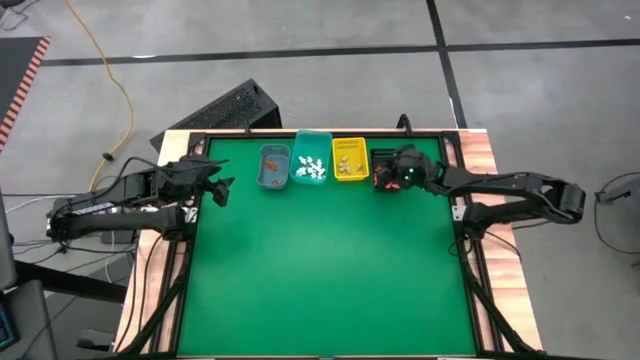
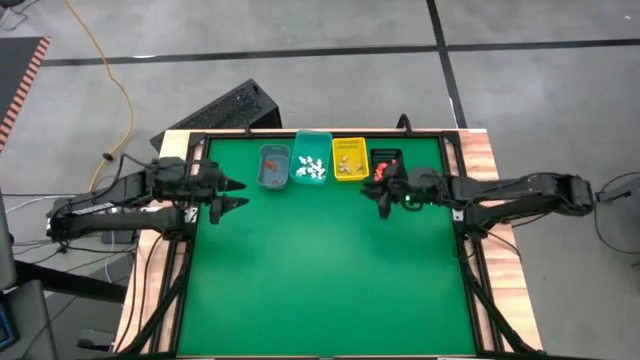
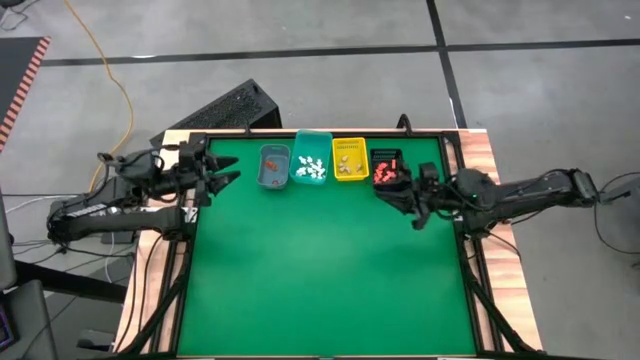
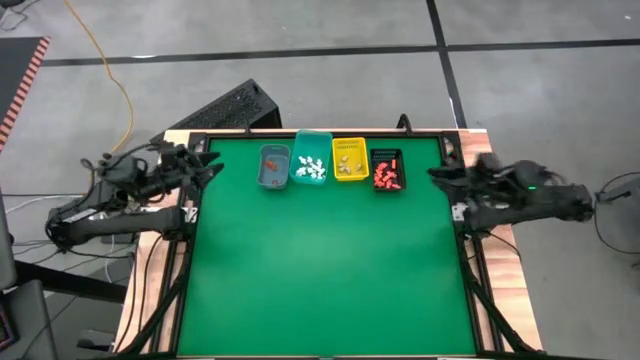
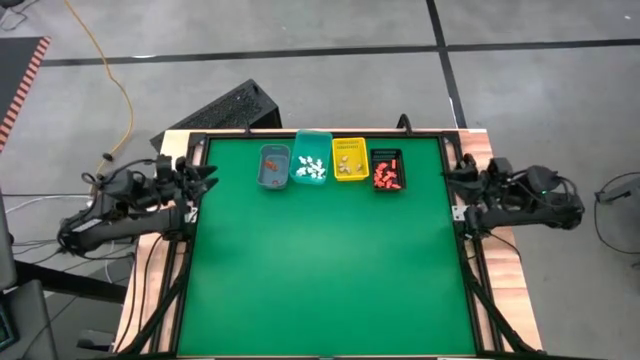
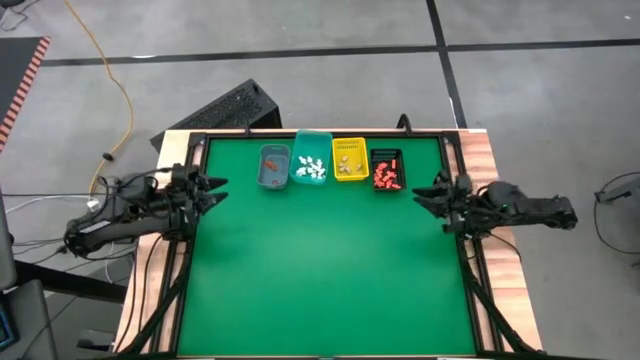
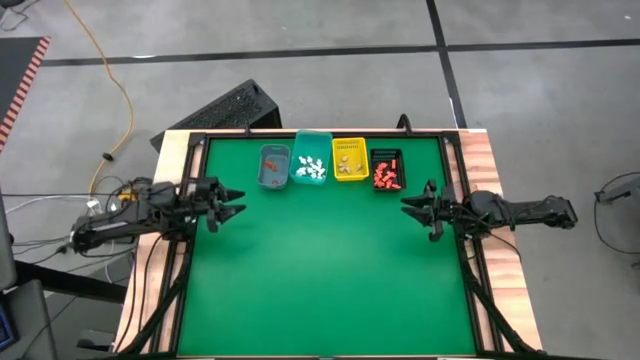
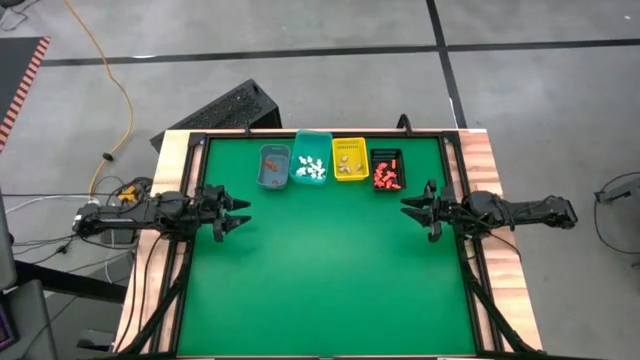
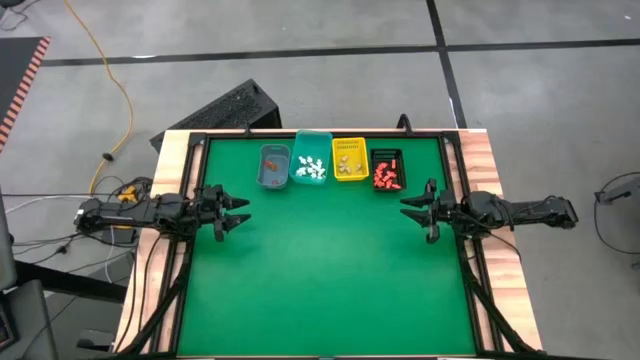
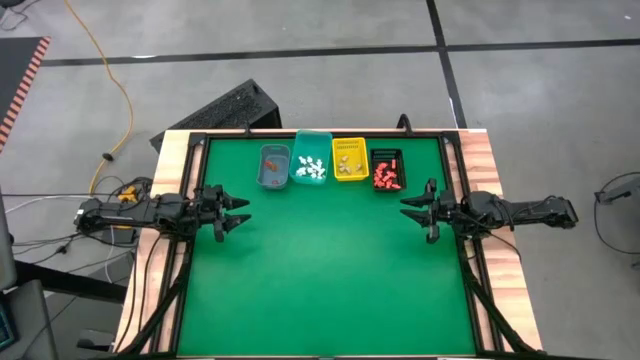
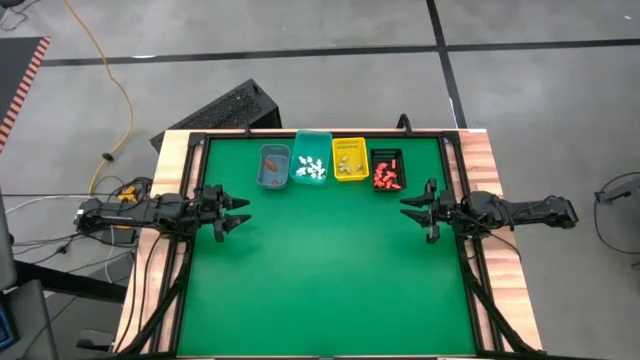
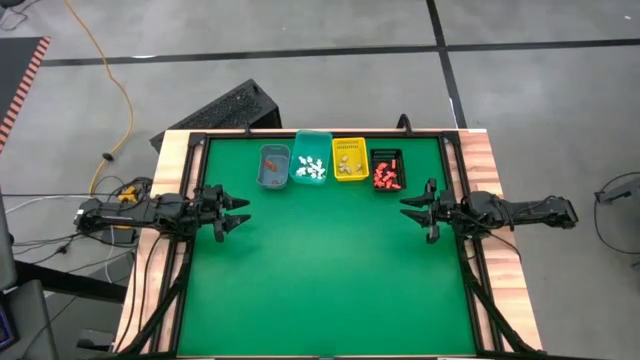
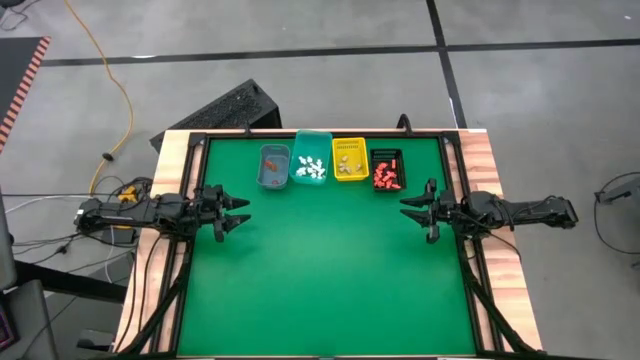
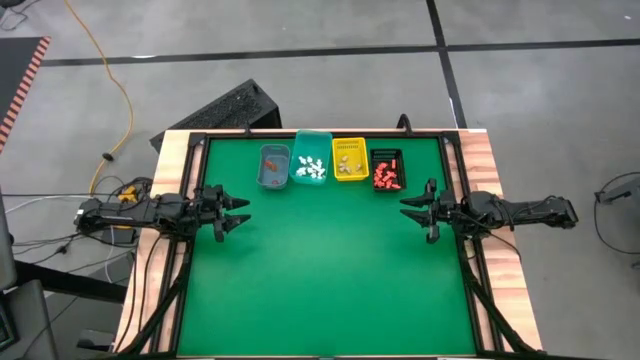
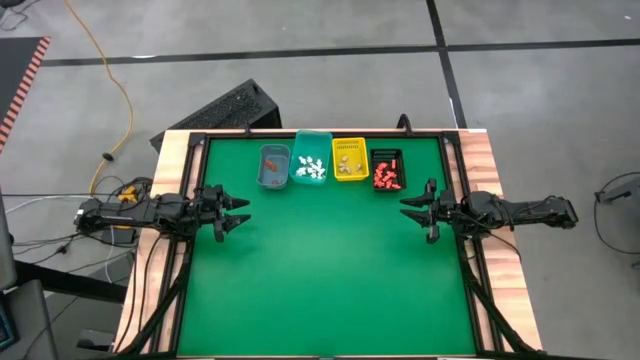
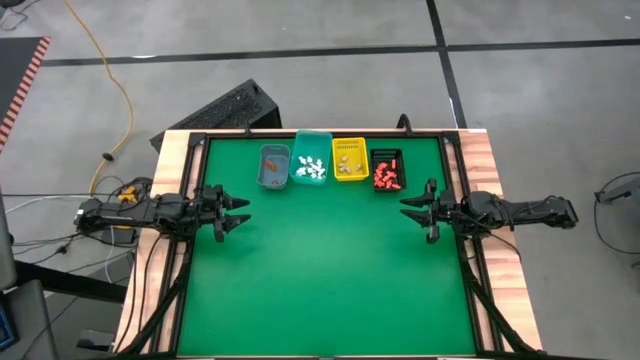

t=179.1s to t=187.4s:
Task: Sort Halloween decoration
Return to Home Position

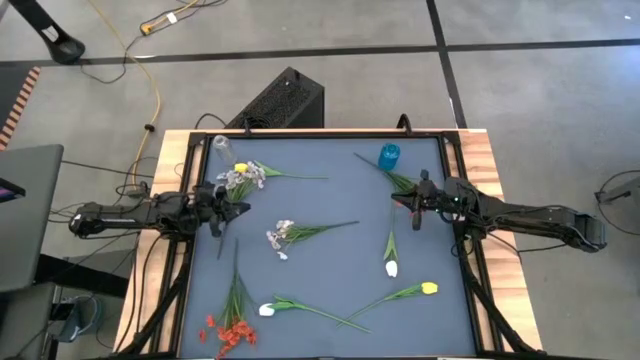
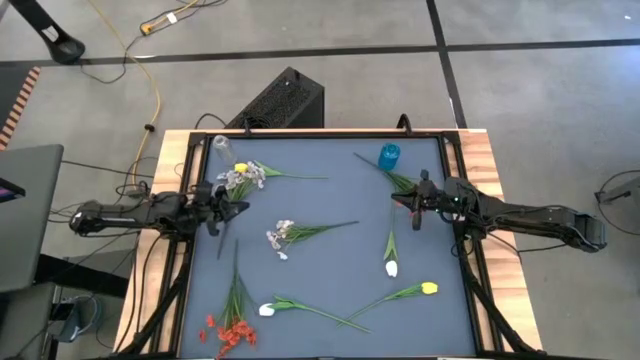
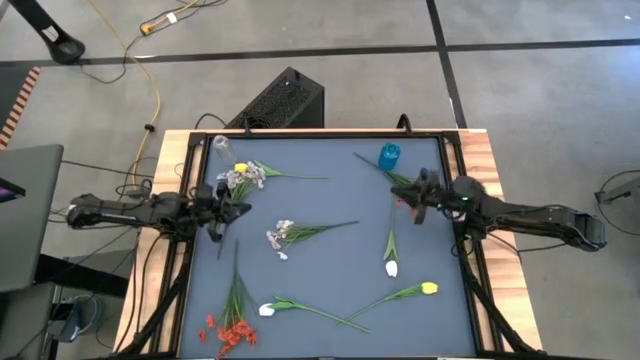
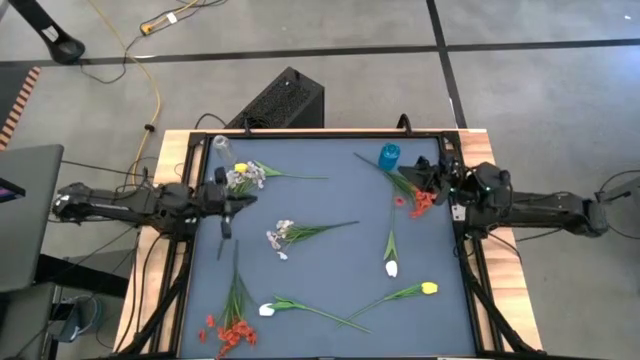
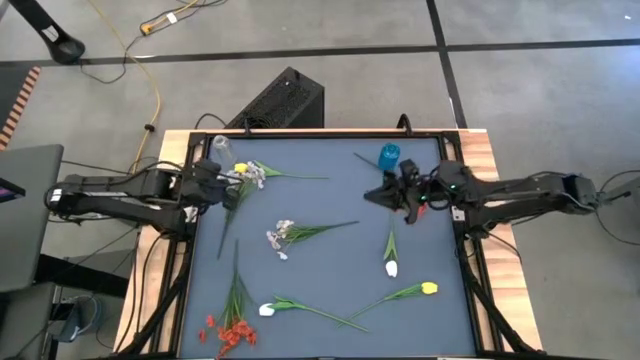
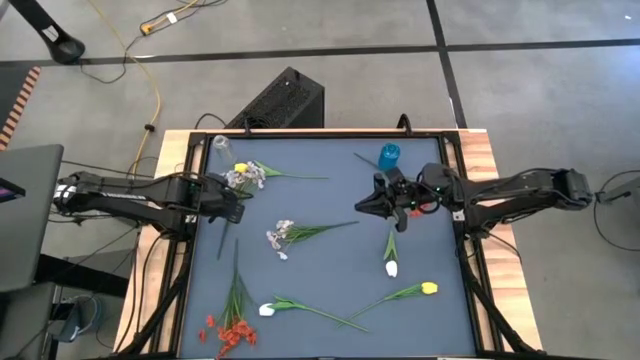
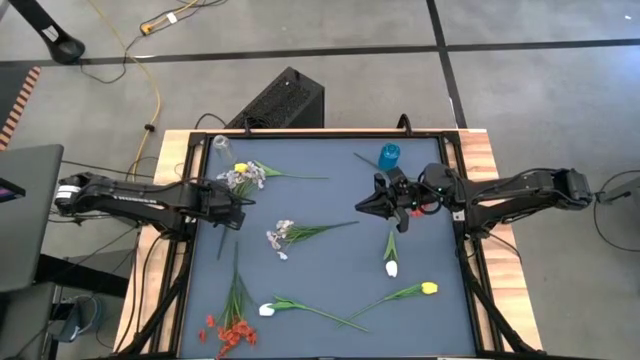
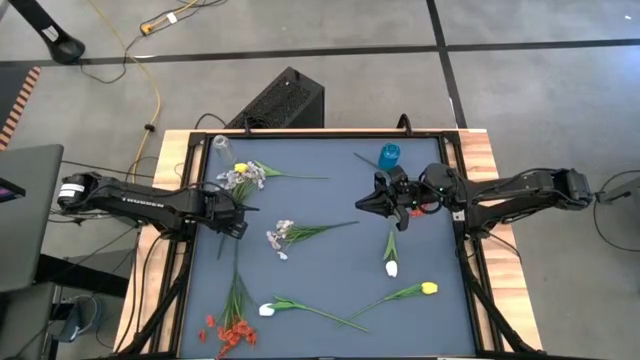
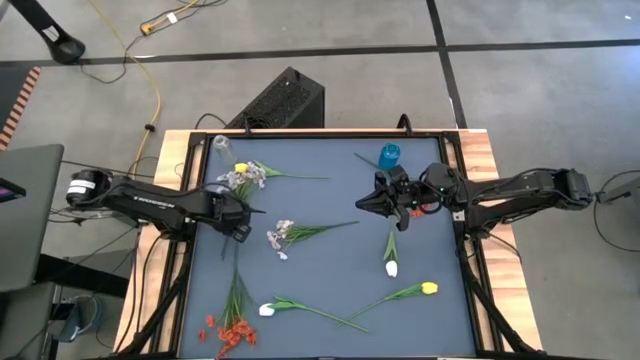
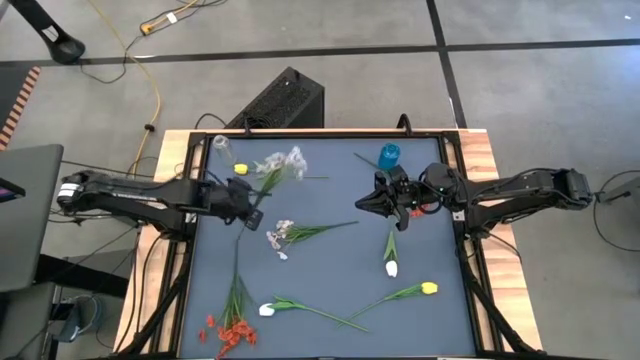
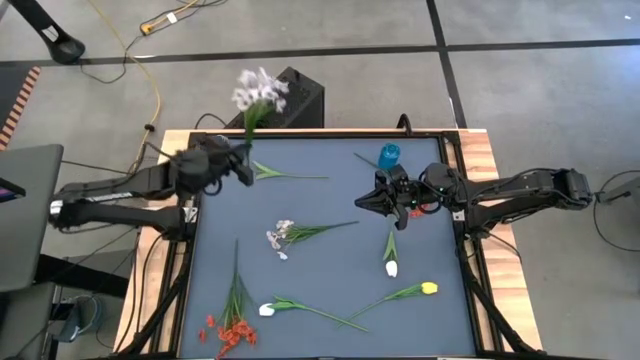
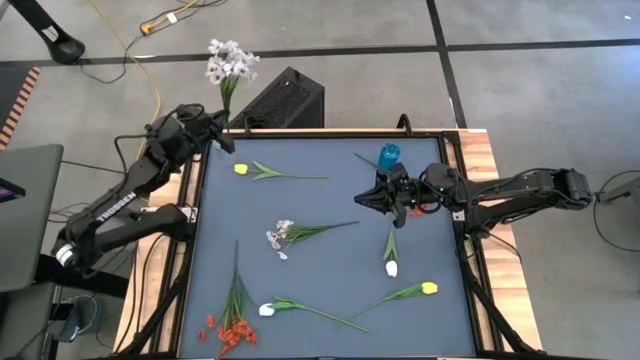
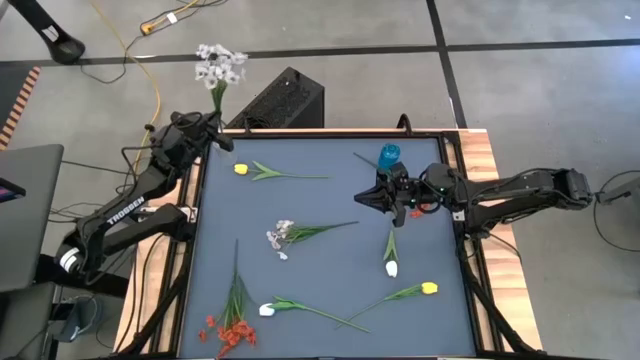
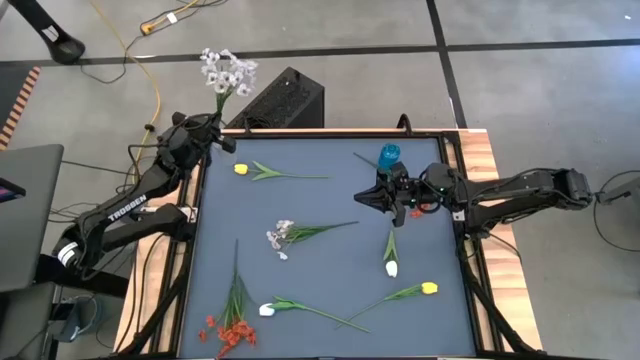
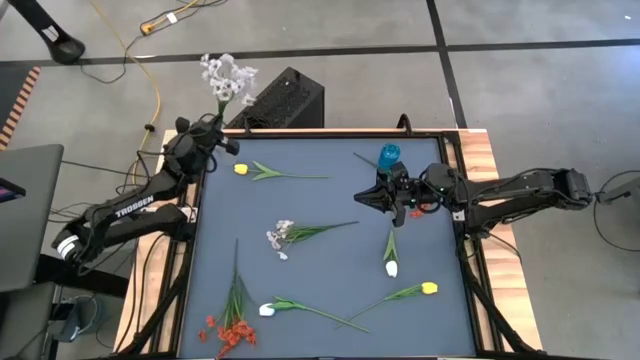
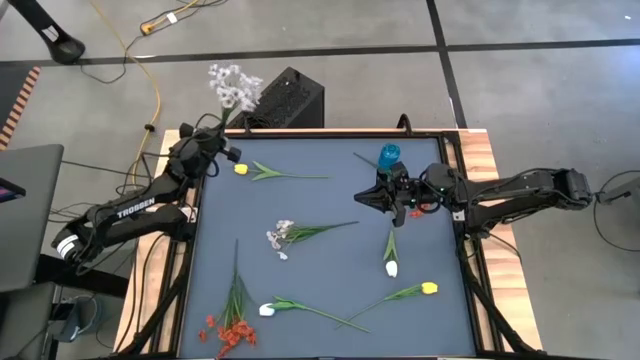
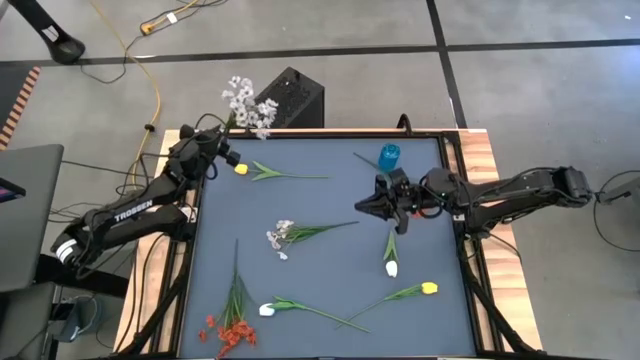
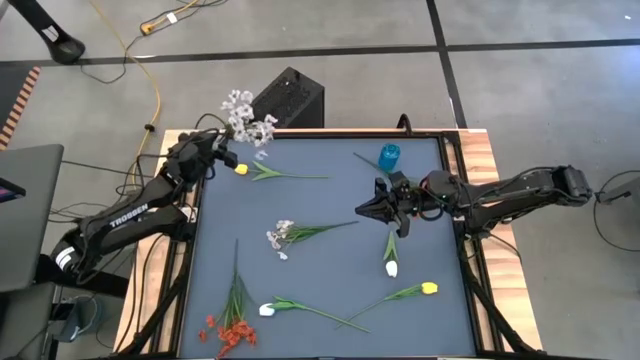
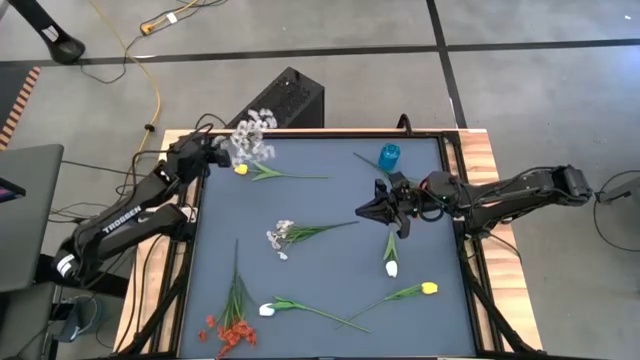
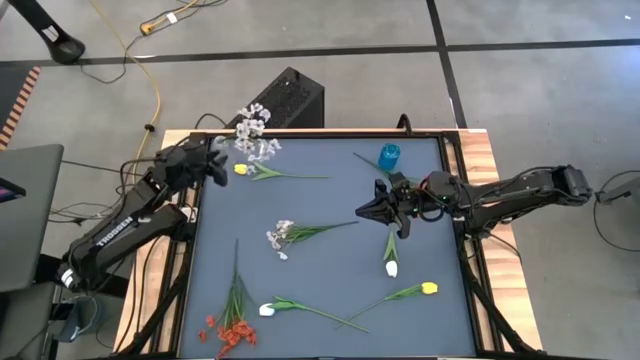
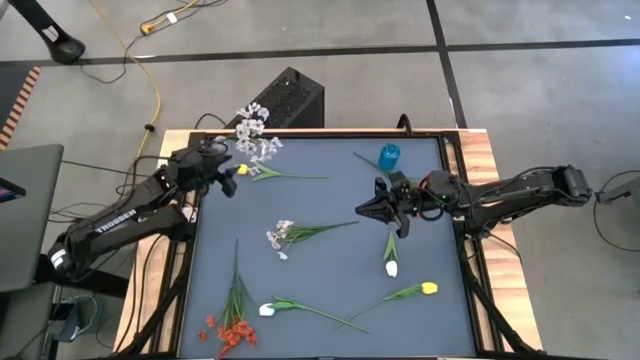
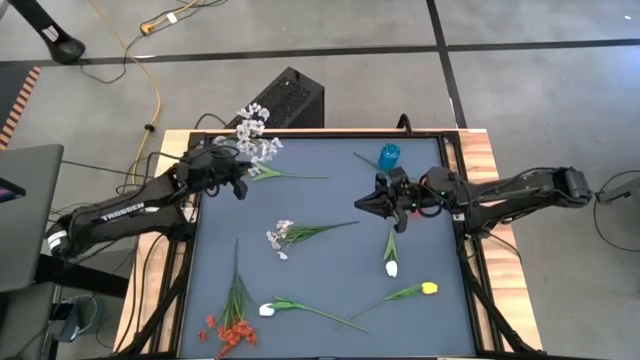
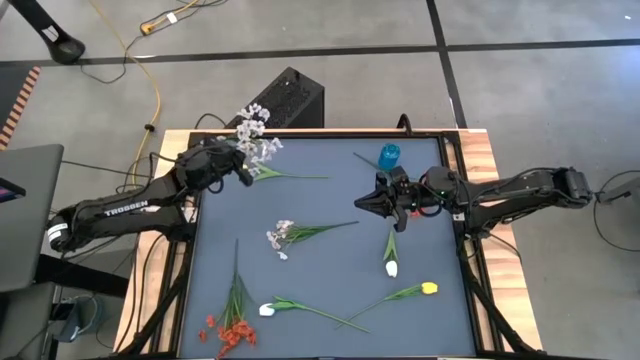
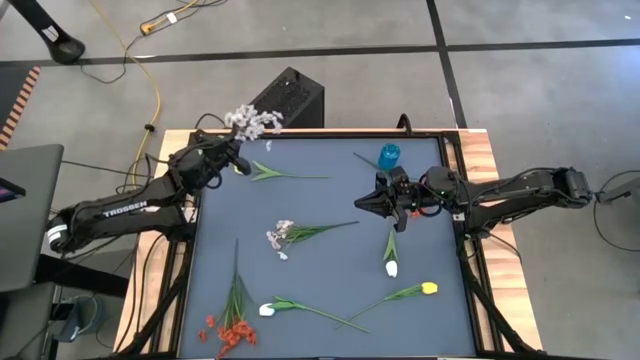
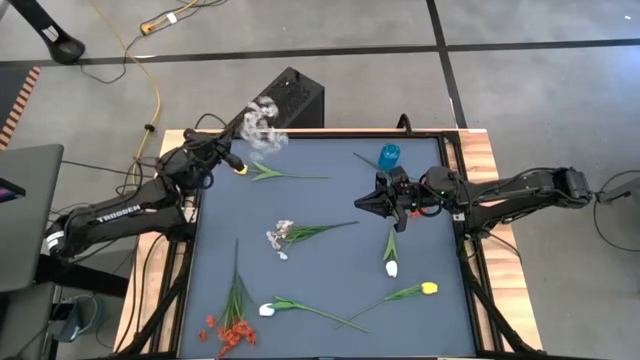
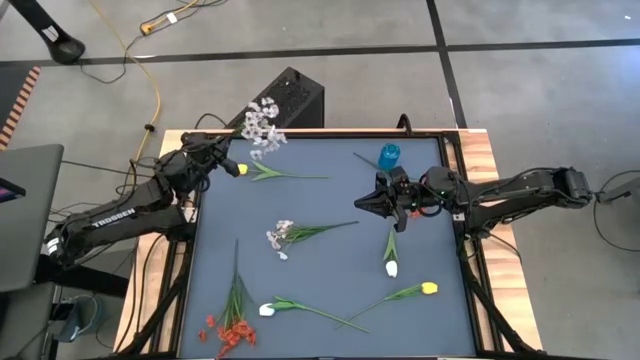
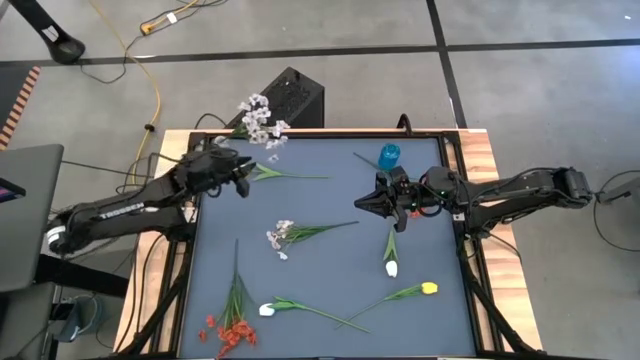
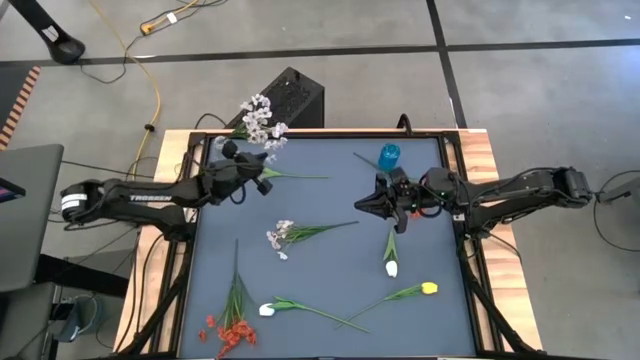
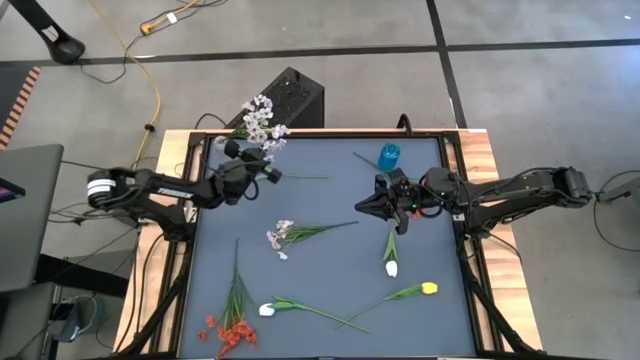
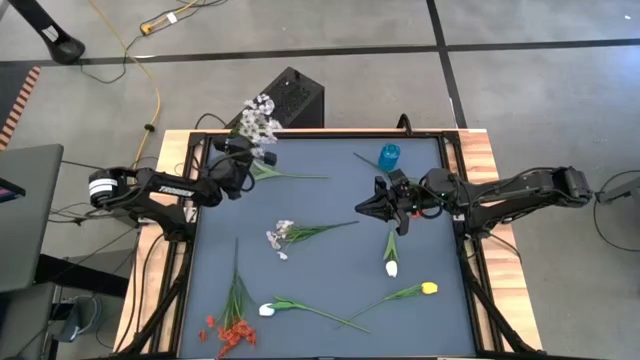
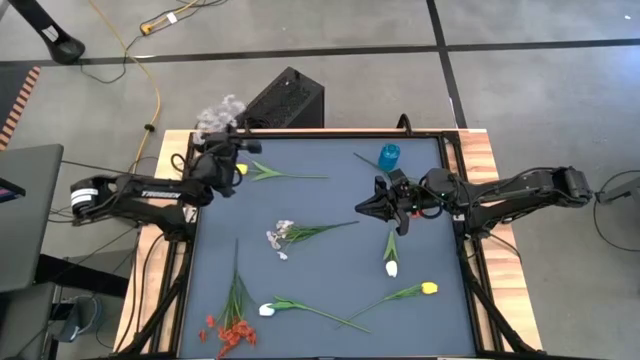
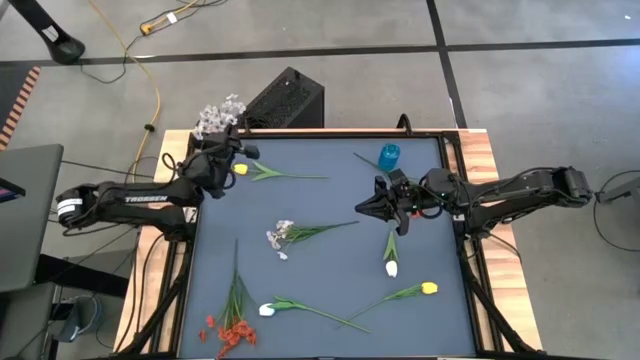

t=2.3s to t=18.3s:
Task: Sort flowers into vase by color
Put the top white flower into the transparent vase
